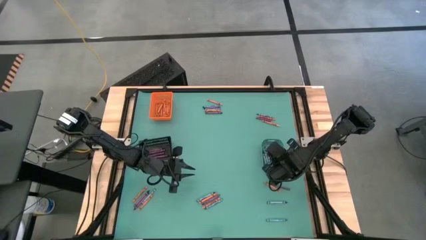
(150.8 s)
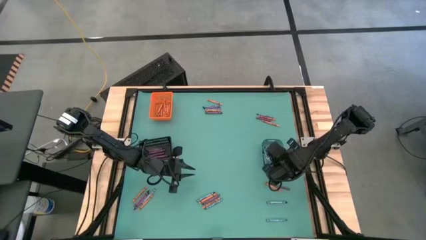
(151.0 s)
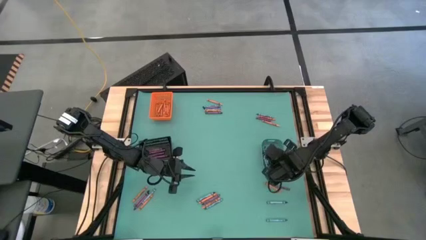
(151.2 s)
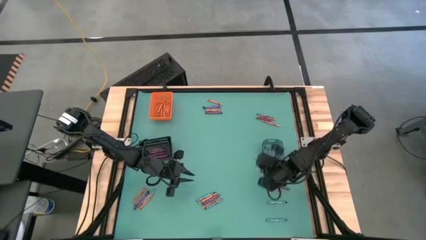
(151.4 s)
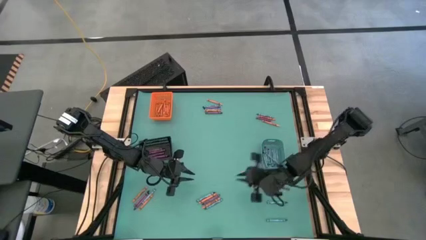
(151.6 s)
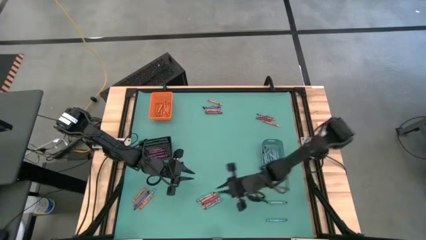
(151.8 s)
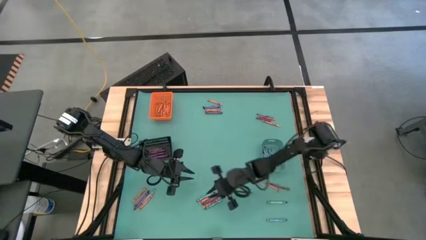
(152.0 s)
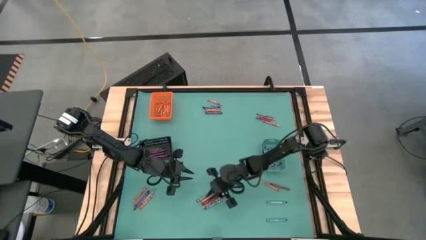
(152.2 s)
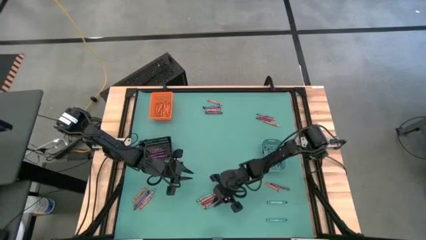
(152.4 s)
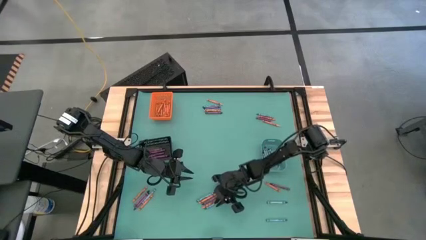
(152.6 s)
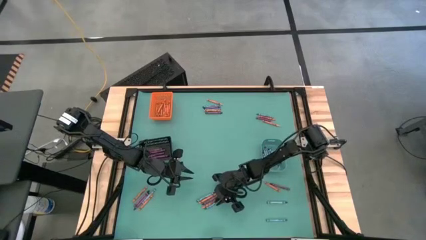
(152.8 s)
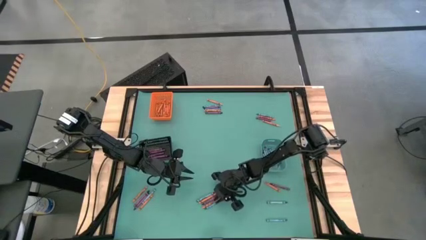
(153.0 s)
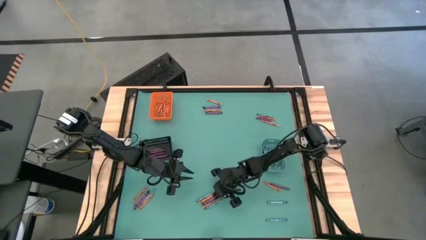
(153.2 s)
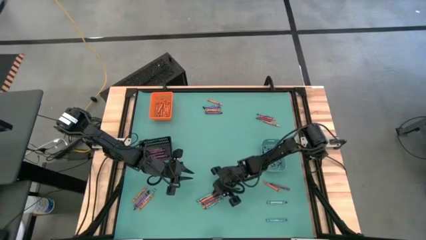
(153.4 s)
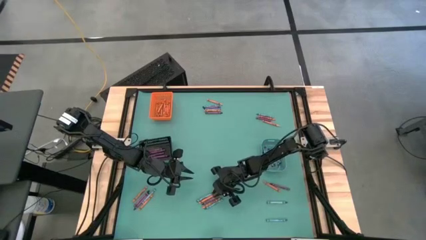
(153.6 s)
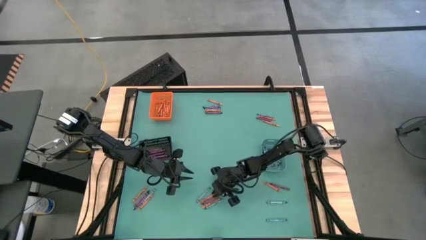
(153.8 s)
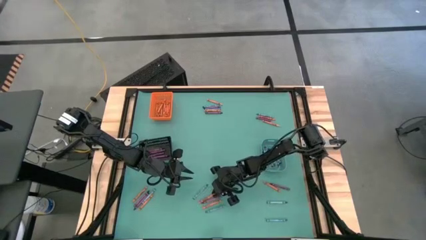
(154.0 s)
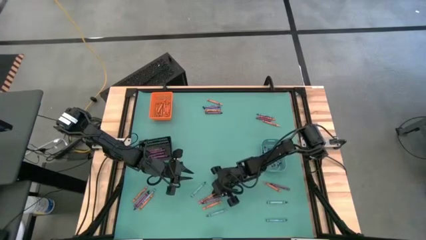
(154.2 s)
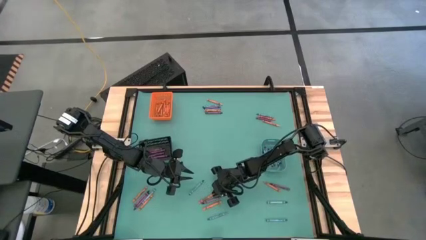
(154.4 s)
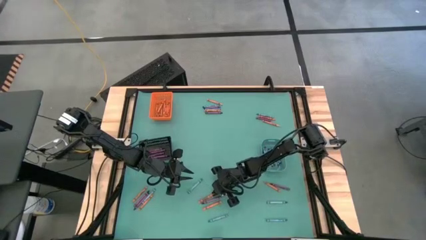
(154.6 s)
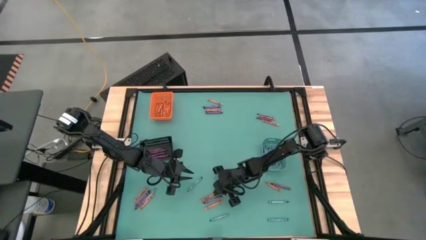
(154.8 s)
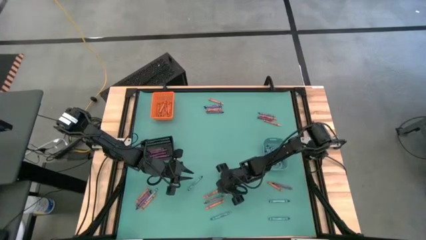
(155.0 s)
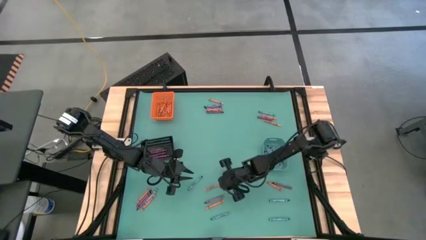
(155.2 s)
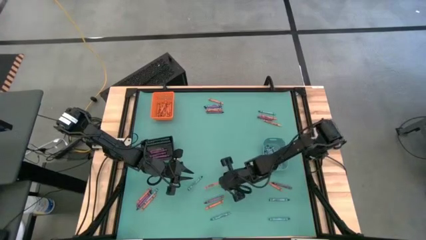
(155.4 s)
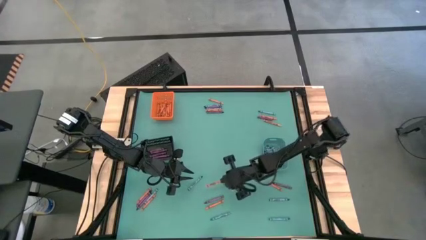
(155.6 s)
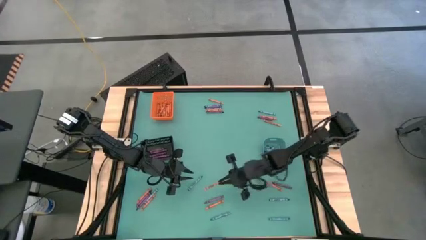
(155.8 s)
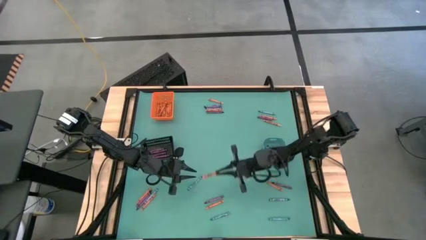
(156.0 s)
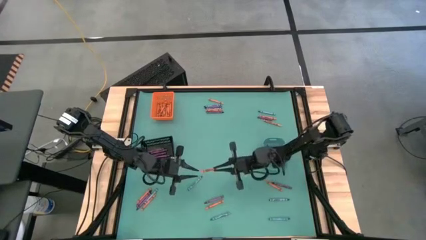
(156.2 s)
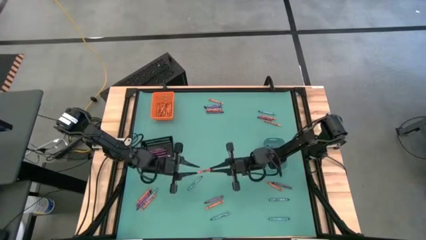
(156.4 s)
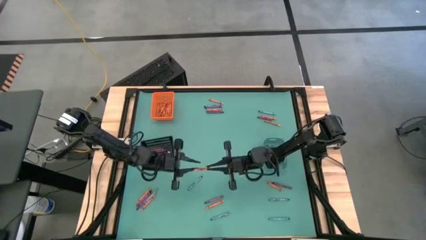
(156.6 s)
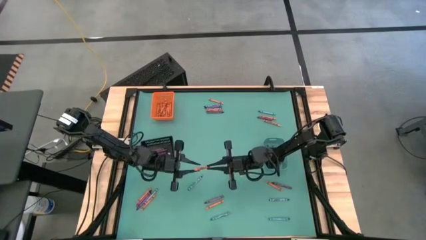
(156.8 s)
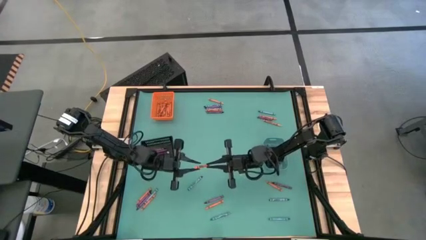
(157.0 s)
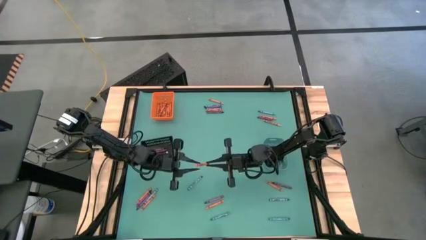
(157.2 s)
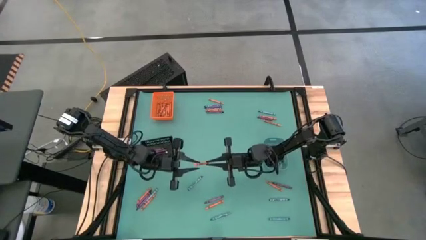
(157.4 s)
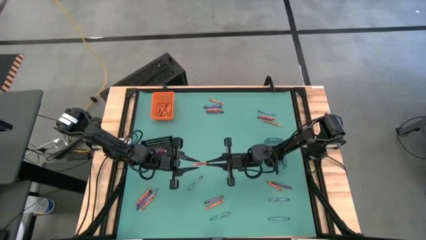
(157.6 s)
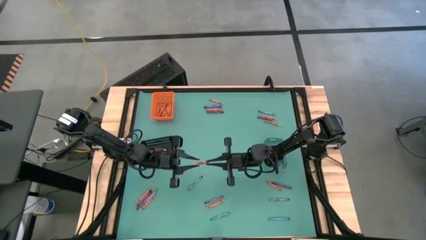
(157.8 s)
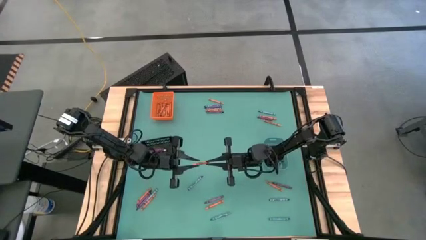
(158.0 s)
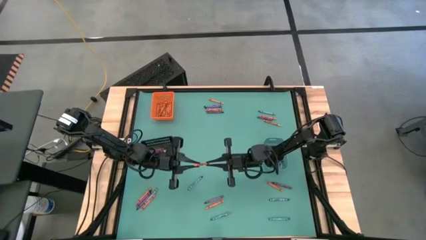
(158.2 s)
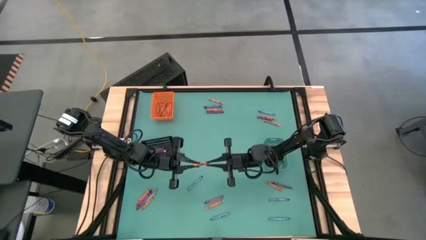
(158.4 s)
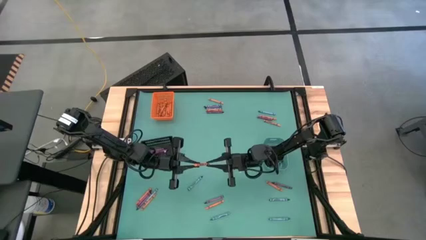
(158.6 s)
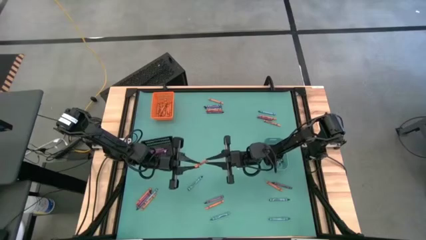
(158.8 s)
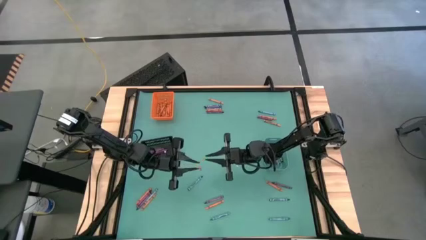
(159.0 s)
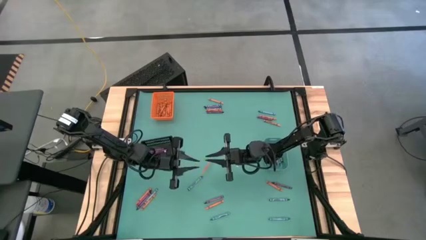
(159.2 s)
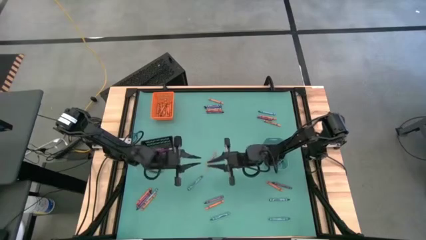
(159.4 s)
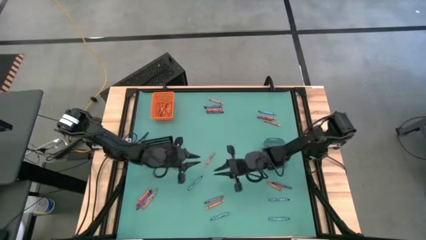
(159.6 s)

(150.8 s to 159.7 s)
Task: Sort crayons
Put the orange crayon into the orange bin

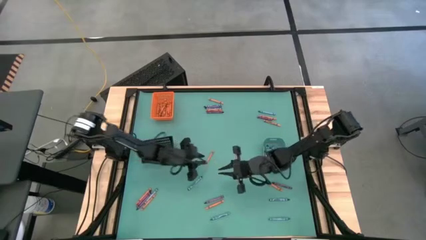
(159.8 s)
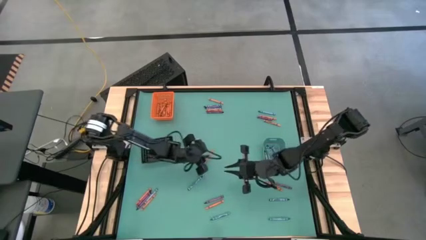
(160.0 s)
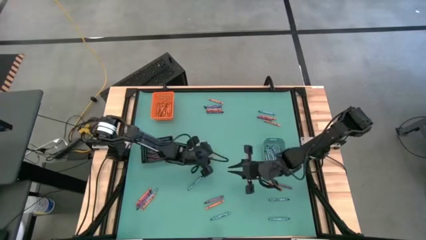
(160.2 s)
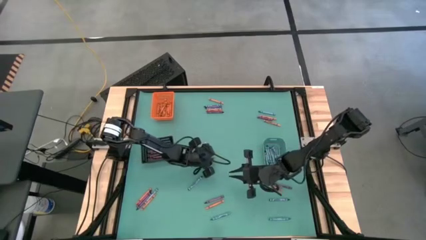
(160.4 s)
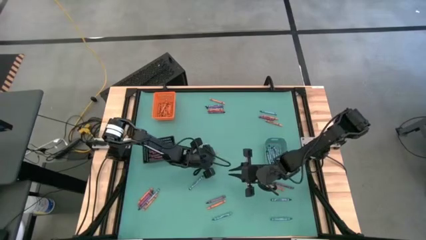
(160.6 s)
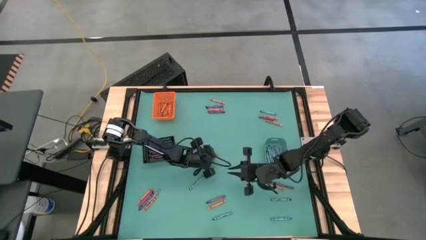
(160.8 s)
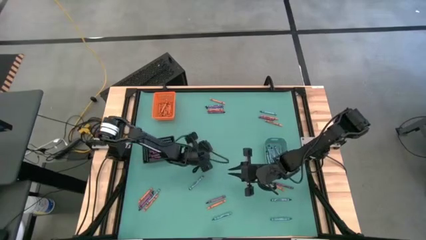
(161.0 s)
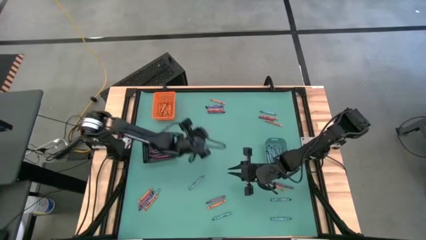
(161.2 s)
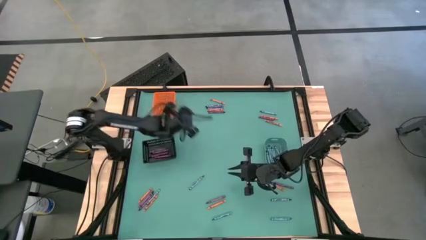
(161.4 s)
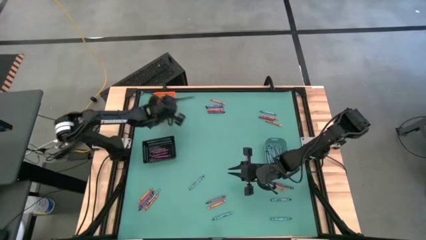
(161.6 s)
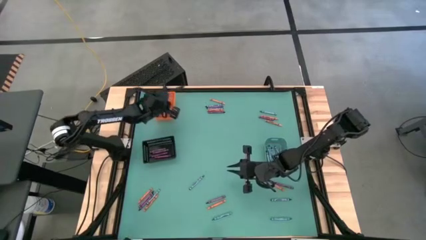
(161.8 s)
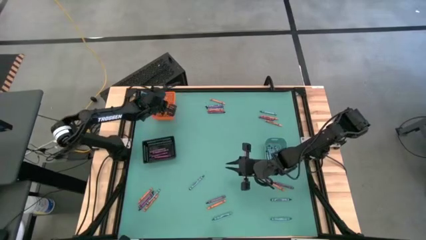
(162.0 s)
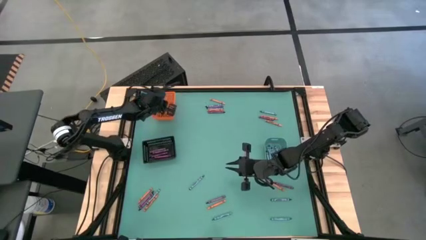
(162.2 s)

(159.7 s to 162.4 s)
Put the orange crayon into the orange bin

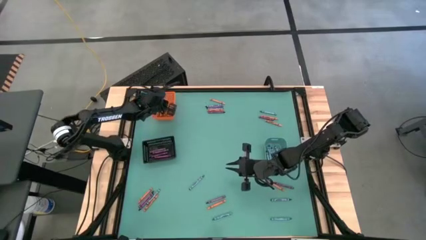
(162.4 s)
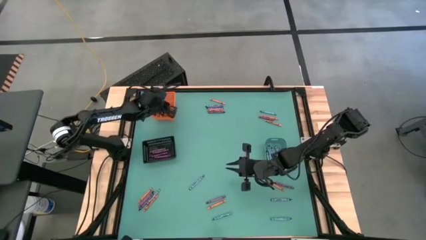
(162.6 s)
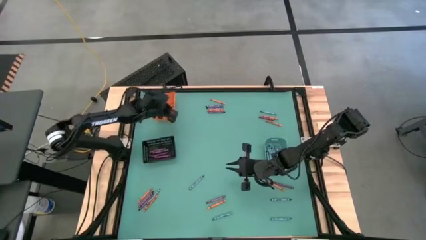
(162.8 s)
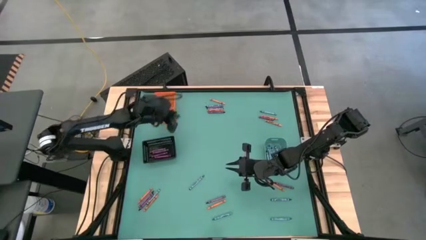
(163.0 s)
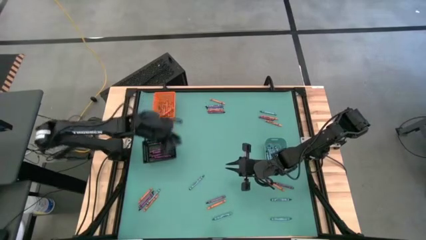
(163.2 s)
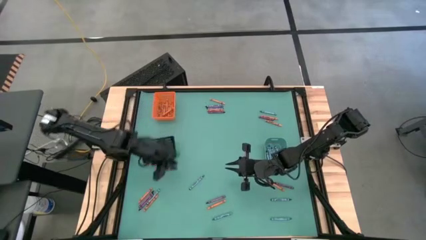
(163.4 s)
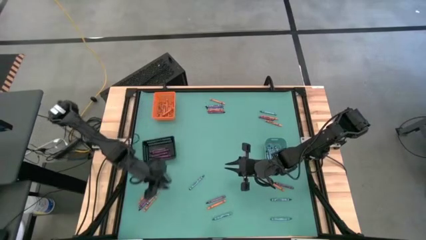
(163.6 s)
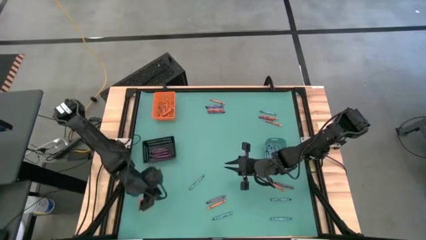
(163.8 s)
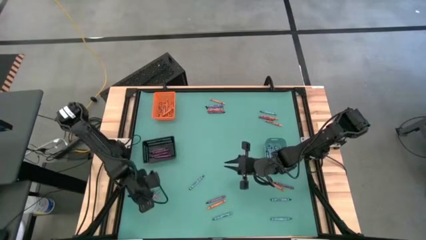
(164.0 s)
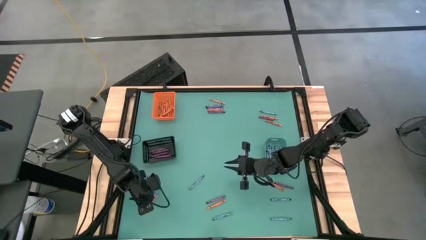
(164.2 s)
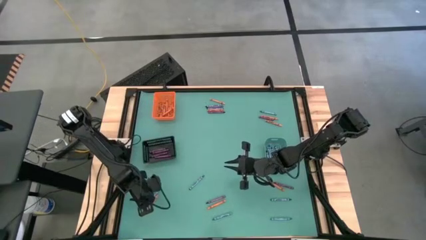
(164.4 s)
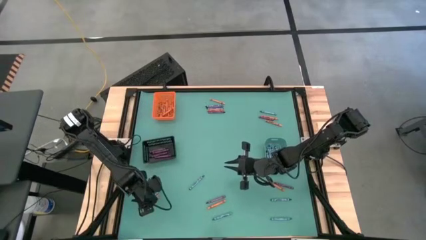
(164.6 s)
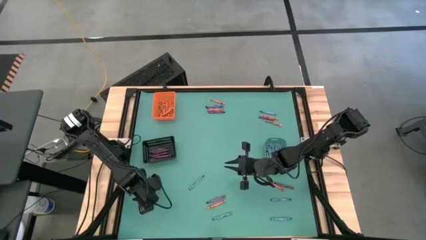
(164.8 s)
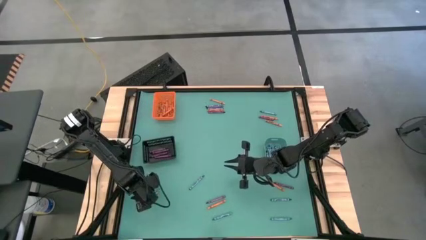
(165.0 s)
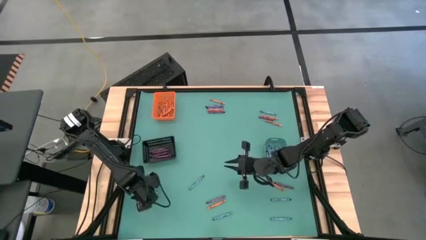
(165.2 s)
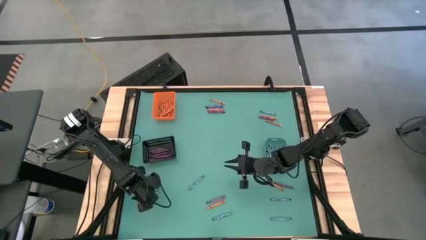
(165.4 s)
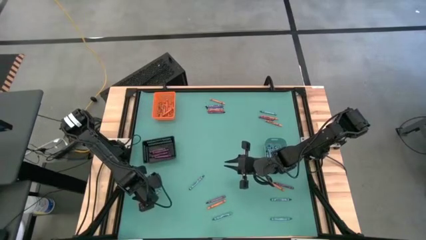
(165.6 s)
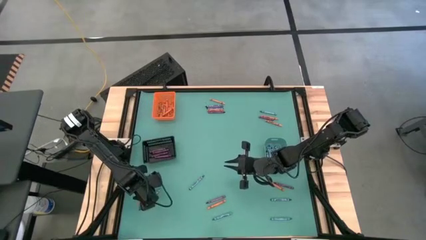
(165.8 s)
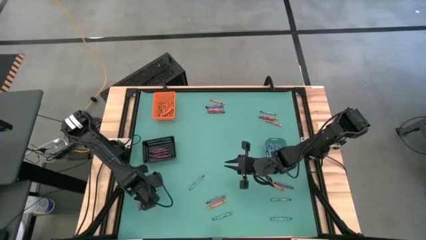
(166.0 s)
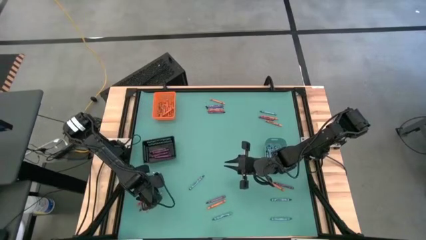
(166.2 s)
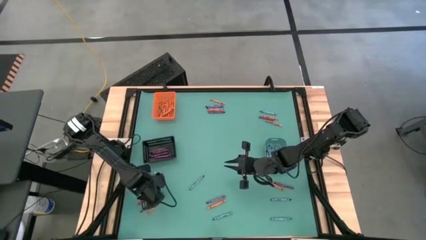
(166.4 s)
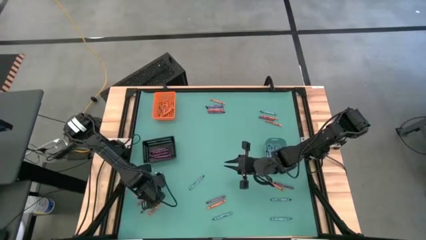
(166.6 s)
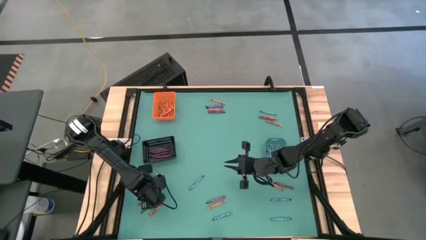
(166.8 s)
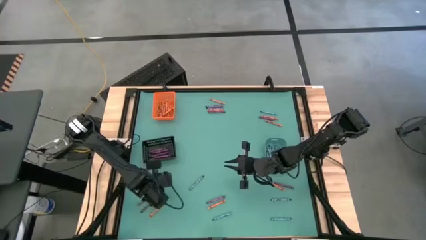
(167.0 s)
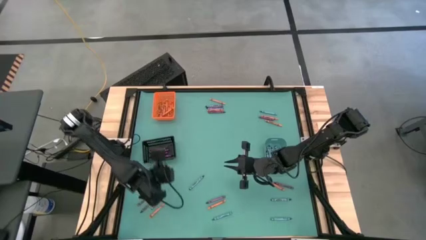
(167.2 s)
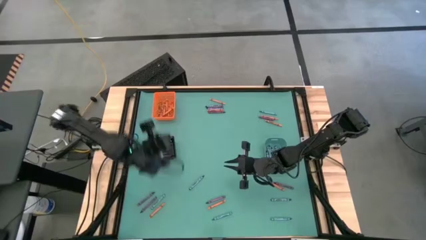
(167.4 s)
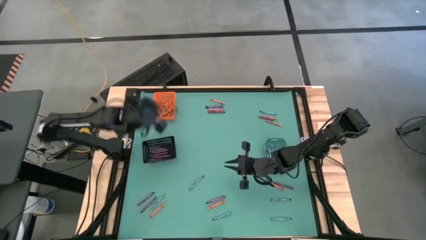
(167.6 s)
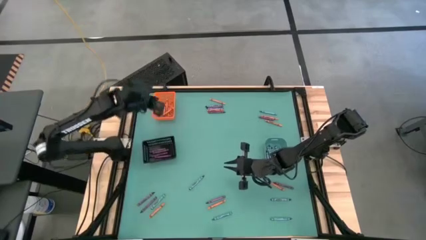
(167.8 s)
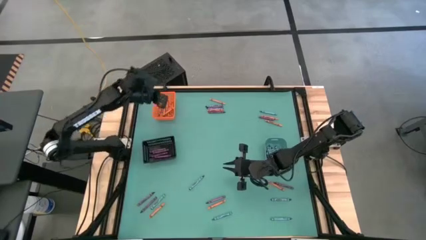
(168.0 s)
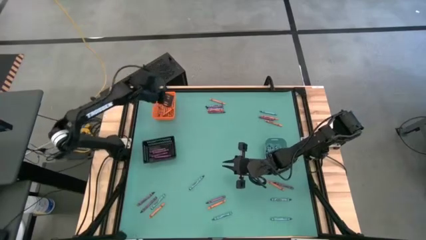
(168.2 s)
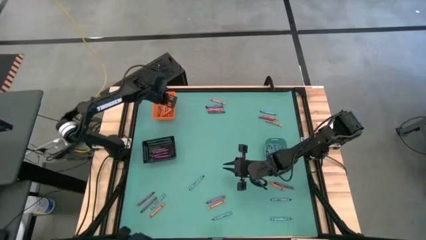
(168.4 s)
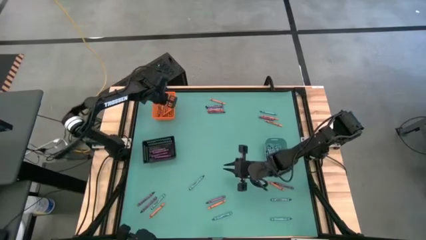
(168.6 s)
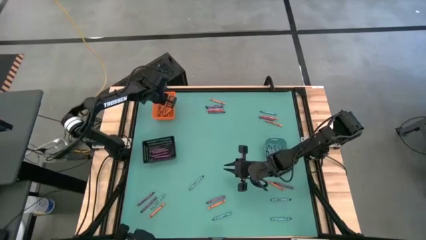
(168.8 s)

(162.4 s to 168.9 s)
Put the orange crayon into the orange bin
